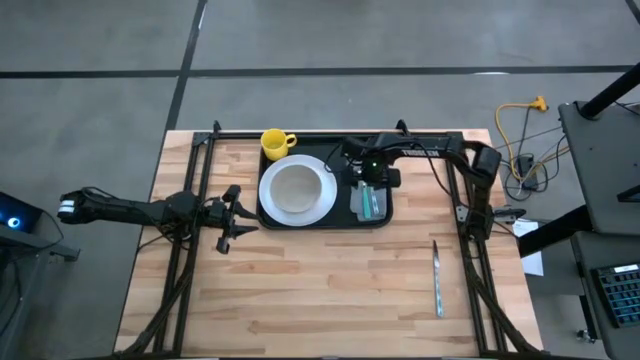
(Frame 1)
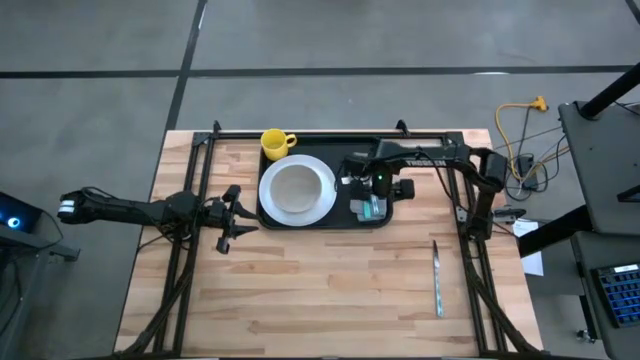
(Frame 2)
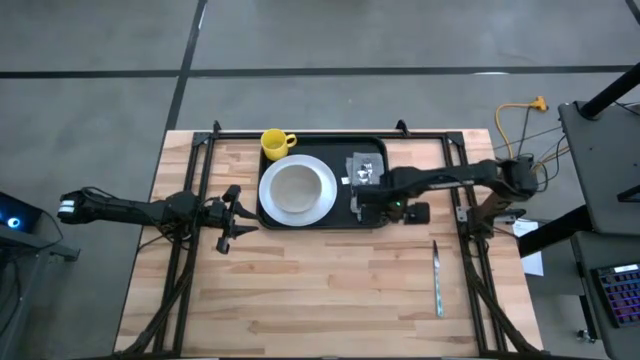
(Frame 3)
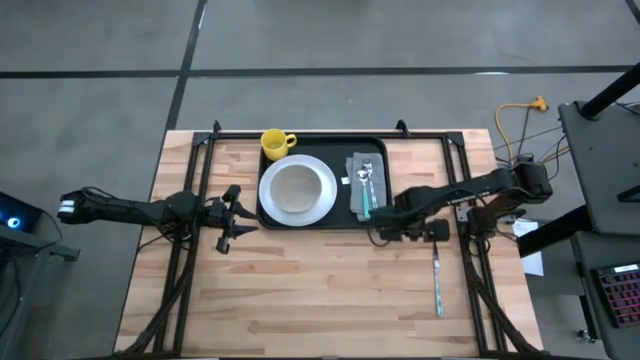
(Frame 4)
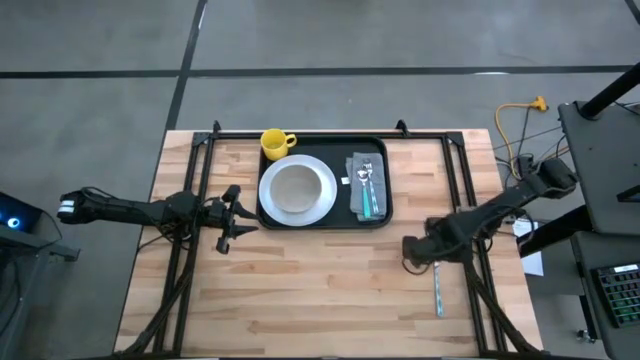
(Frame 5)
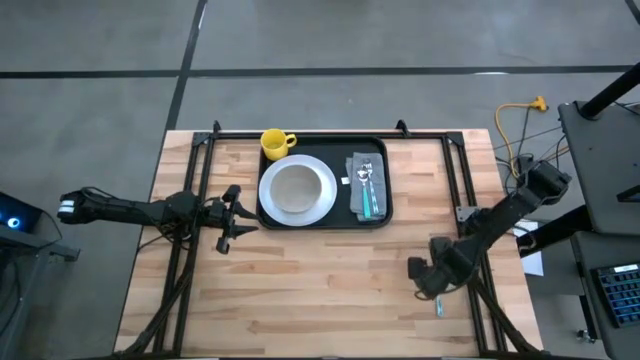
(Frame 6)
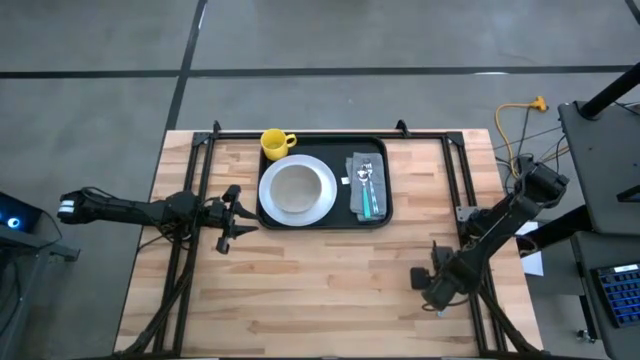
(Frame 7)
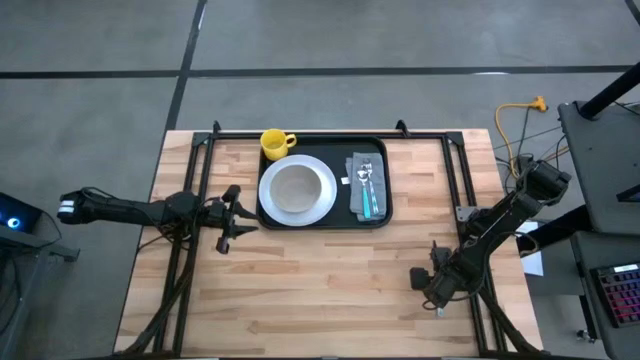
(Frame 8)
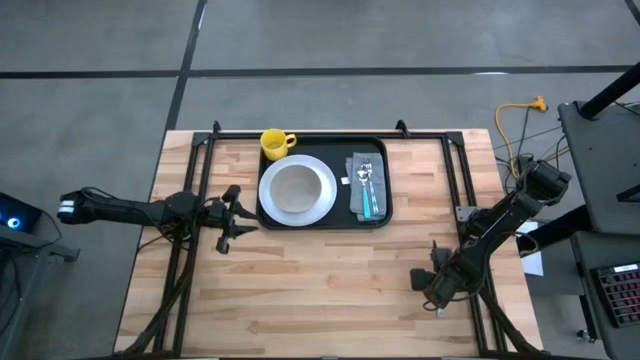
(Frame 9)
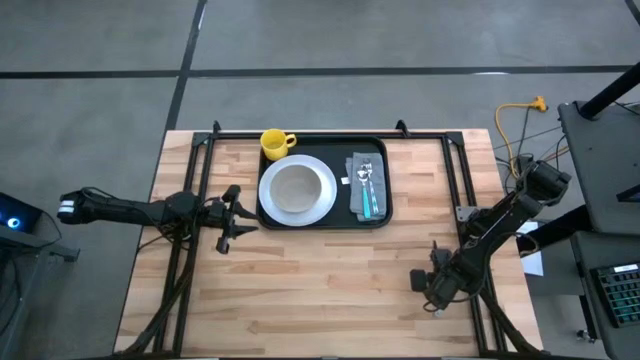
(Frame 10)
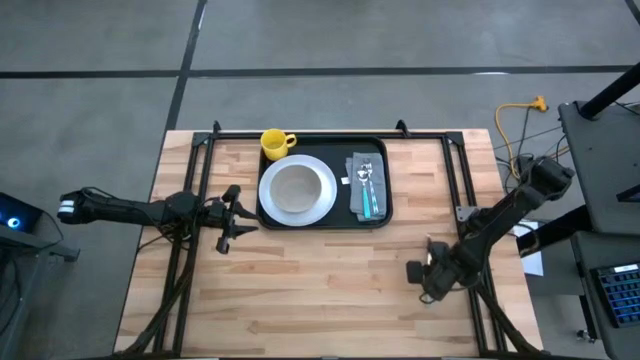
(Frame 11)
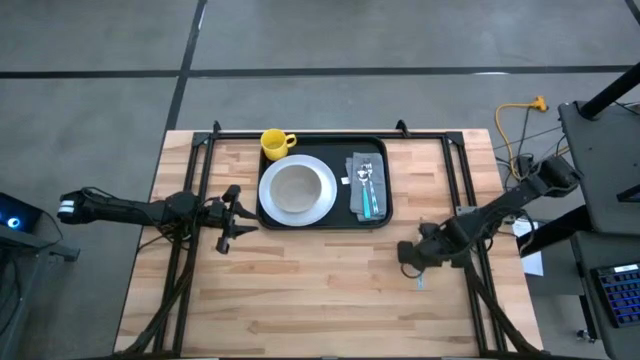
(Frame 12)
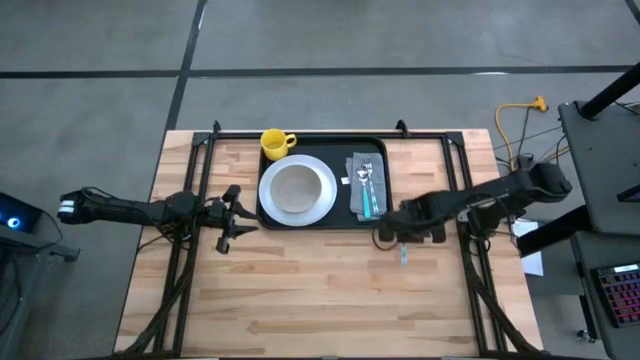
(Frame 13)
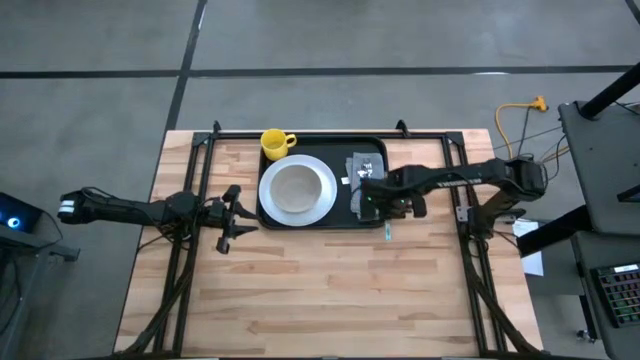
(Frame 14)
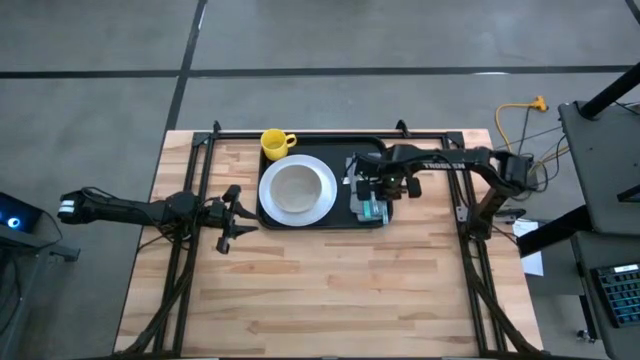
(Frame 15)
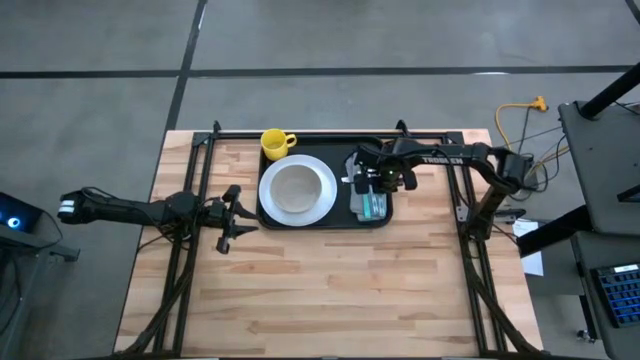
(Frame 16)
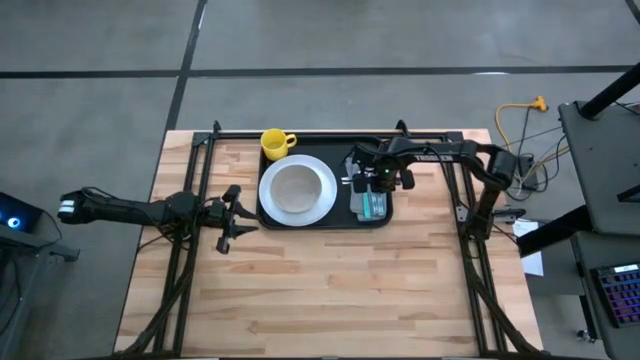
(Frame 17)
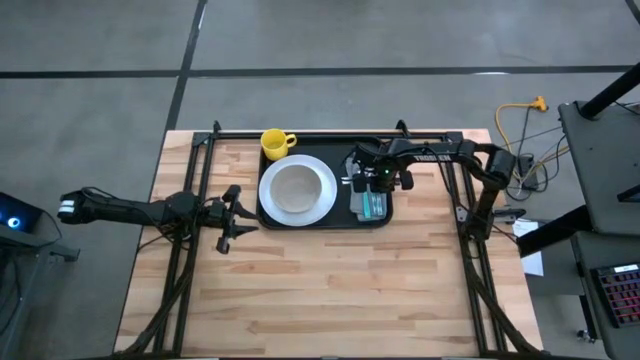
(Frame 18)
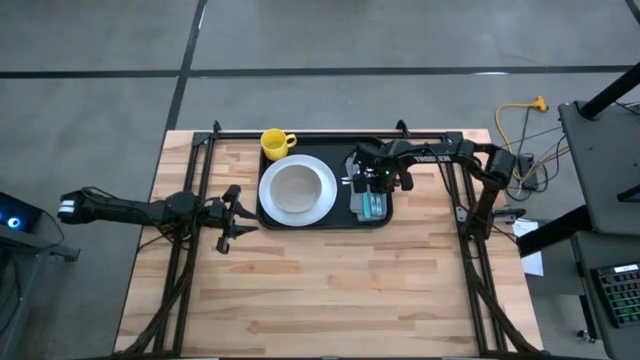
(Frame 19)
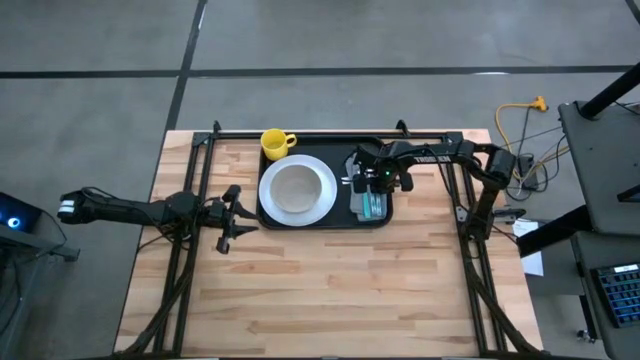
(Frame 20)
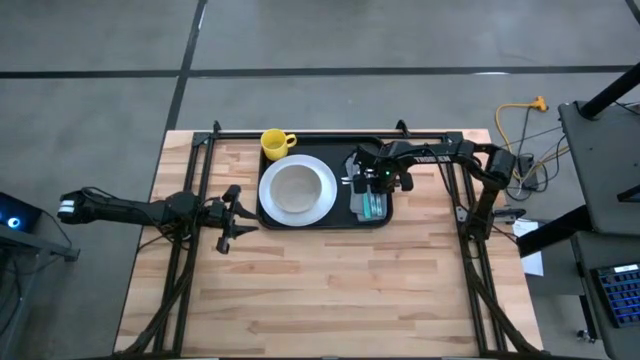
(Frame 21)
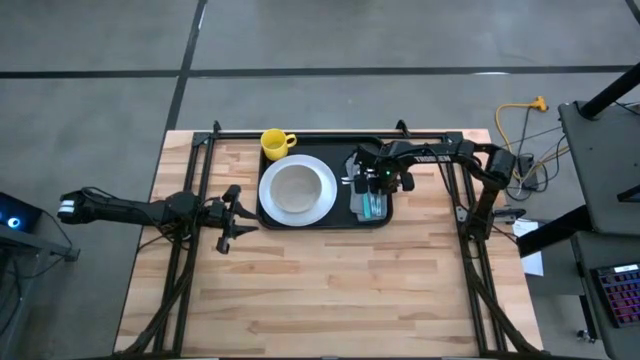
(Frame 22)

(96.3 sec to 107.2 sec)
Task: Set up tray
Put the blue knife on the gray napkin

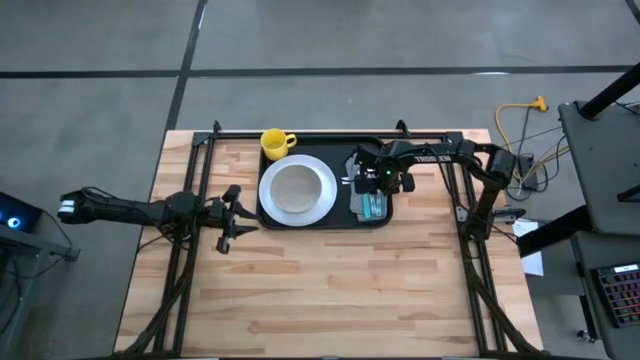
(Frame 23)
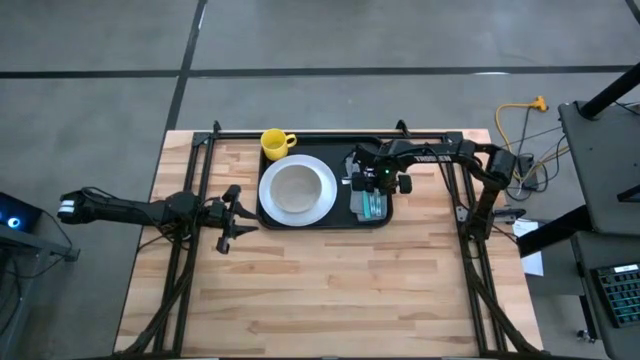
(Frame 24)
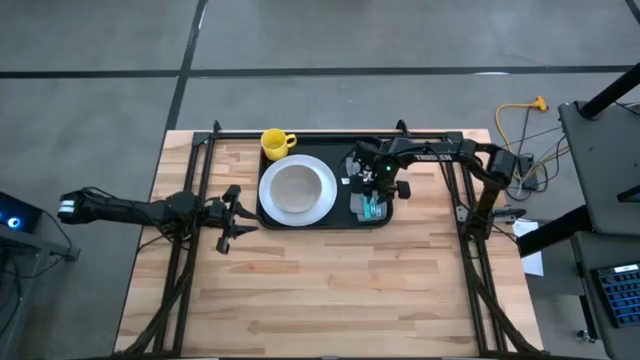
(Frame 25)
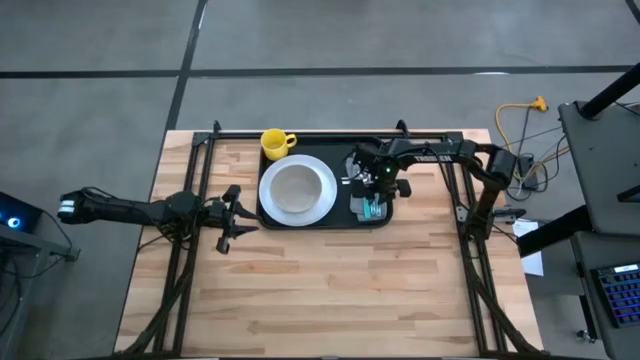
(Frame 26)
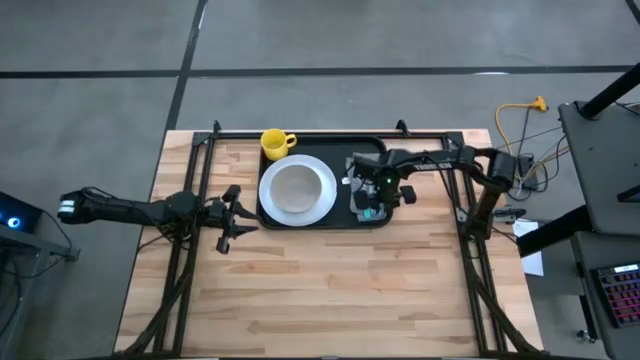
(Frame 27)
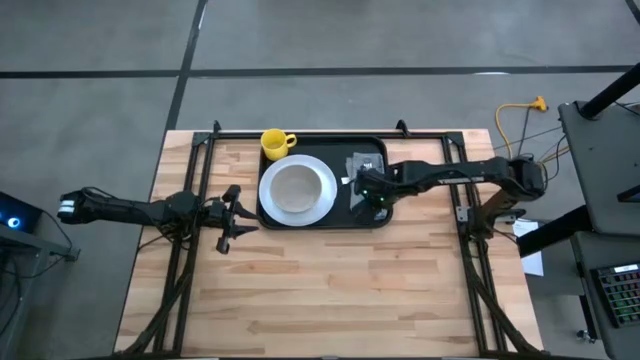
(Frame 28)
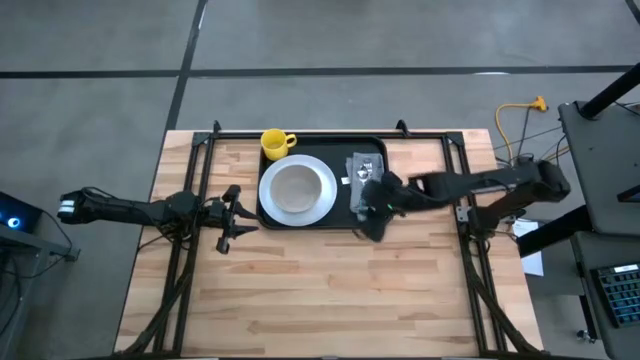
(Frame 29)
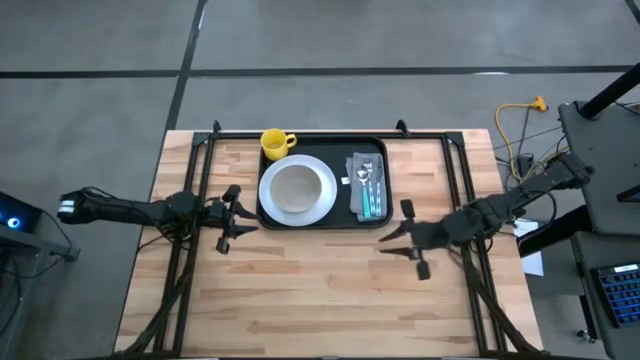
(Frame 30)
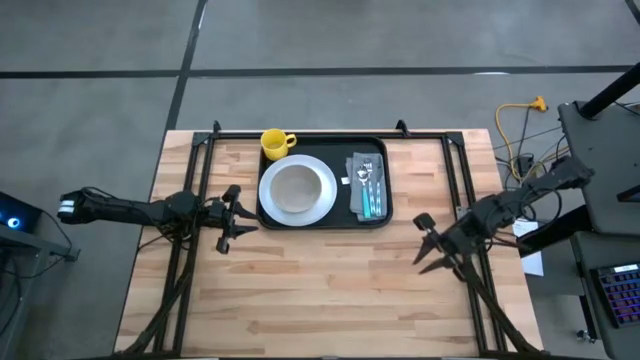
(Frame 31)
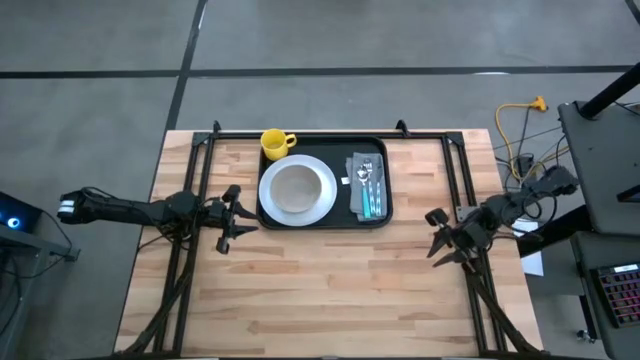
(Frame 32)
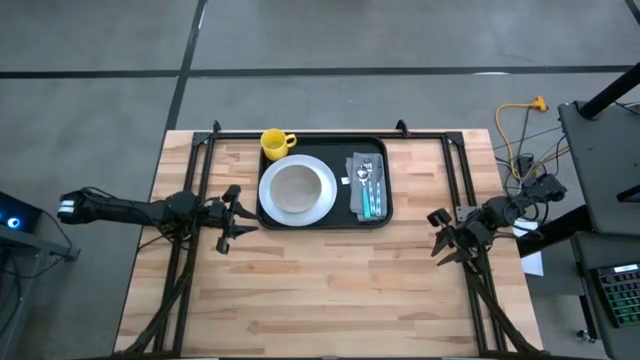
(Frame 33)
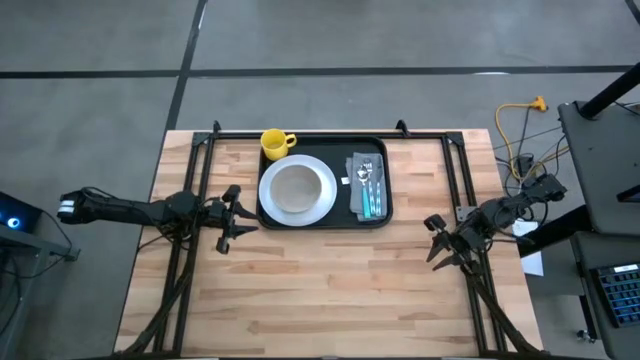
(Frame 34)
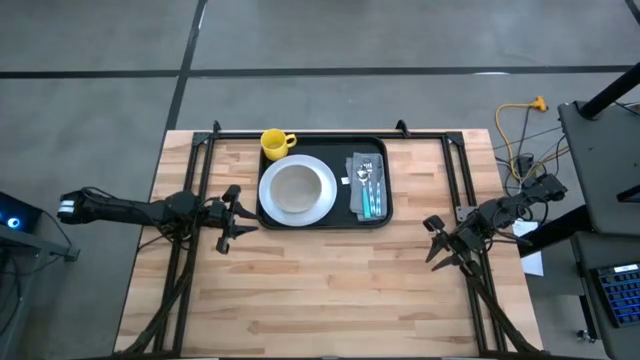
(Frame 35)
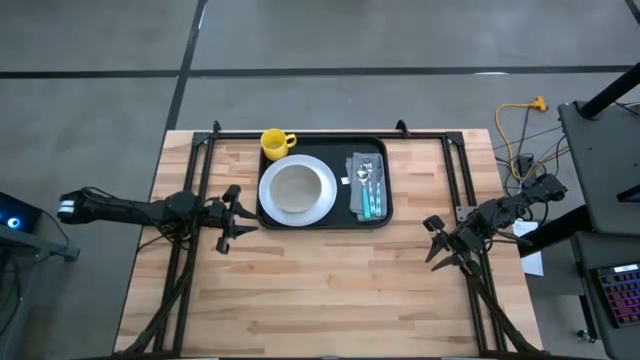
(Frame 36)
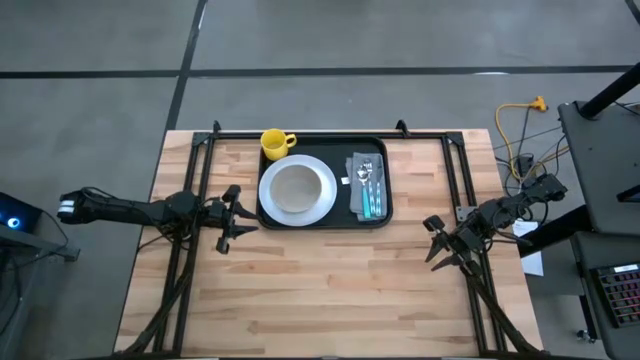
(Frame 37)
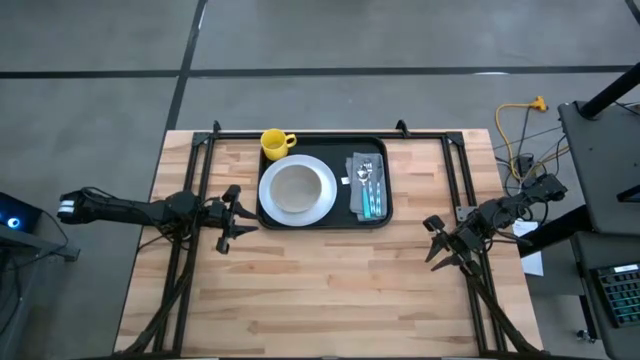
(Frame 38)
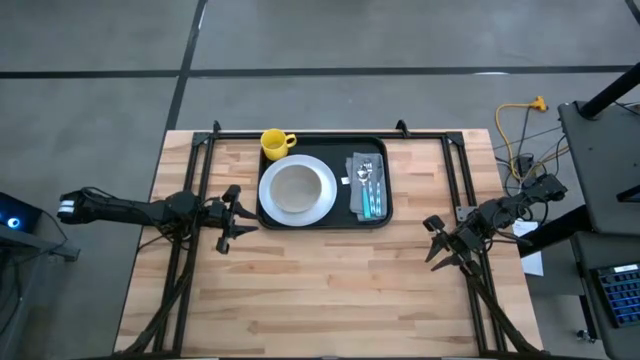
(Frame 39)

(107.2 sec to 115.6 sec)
Return to Home Position

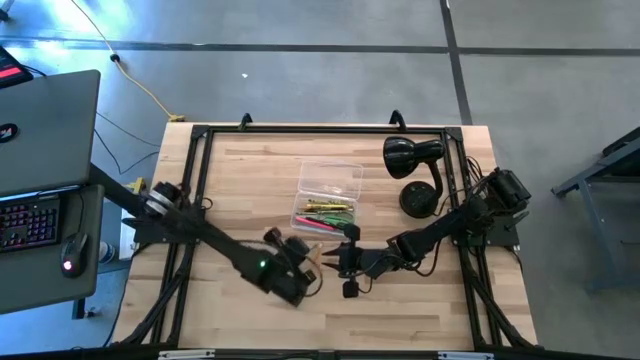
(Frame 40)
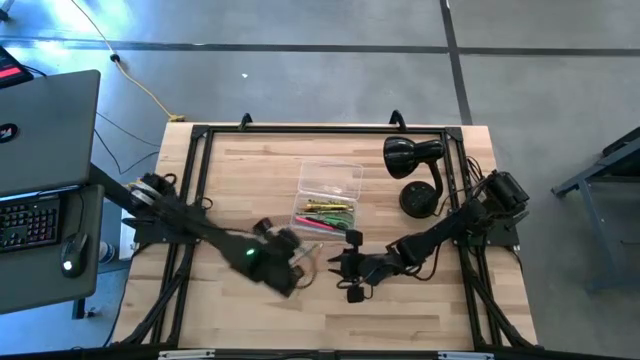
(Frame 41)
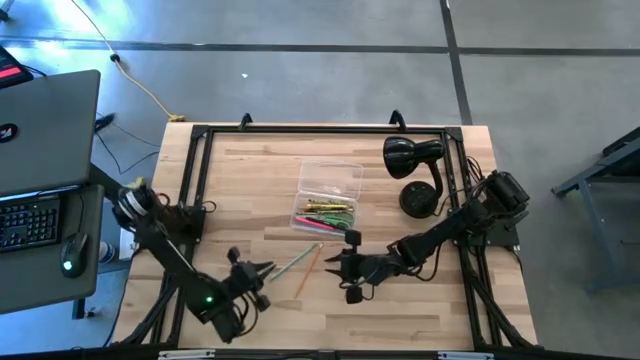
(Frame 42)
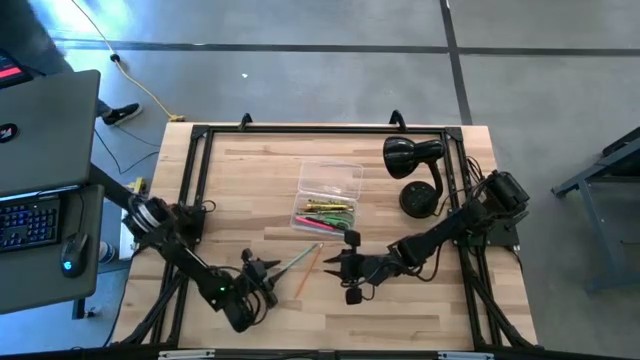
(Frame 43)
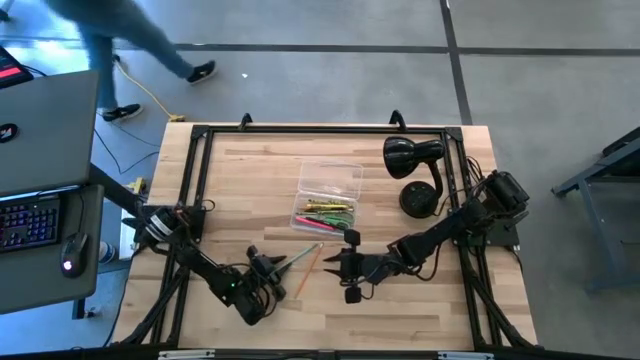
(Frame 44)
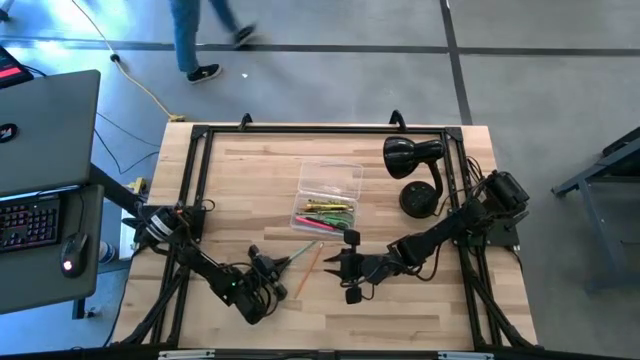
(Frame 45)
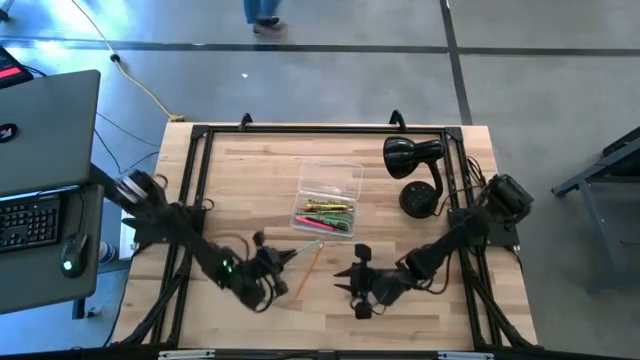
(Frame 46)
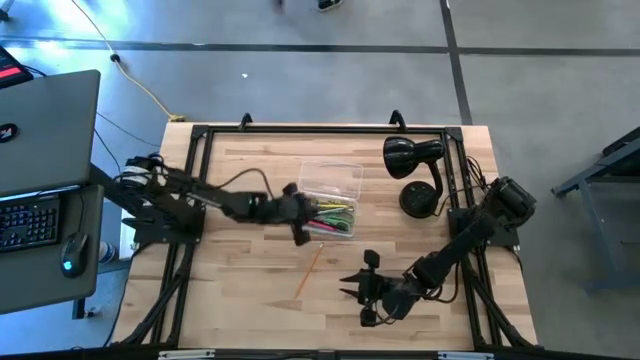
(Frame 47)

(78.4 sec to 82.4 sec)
Task: Pick & place school supplies into a supply box
Put the light blue pencil into the transparent supply box
